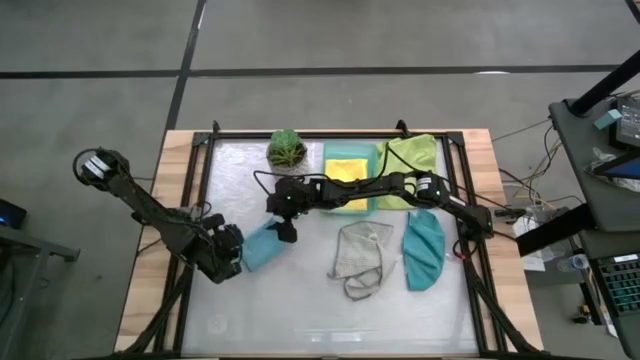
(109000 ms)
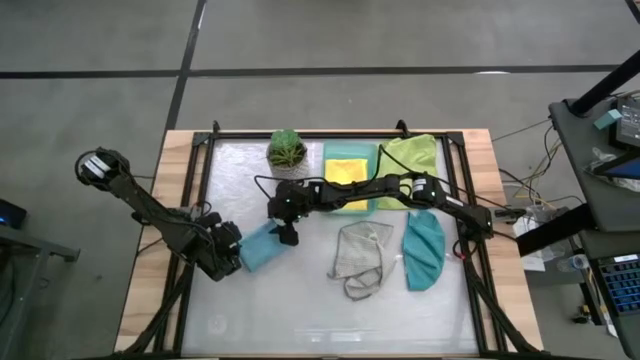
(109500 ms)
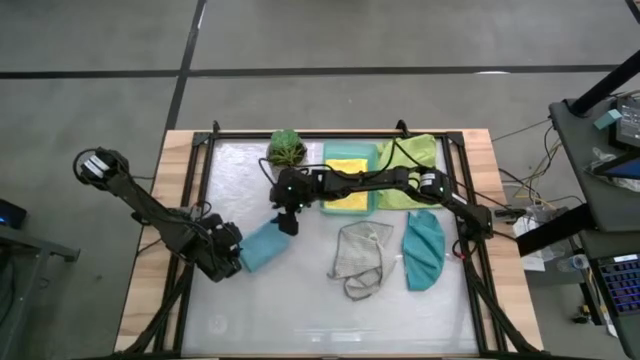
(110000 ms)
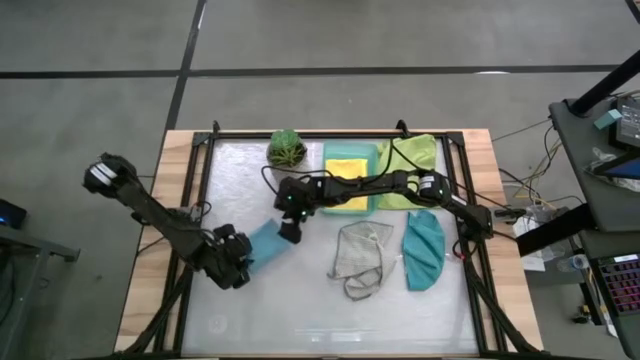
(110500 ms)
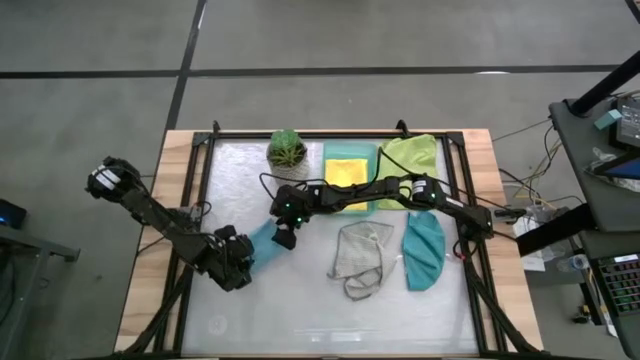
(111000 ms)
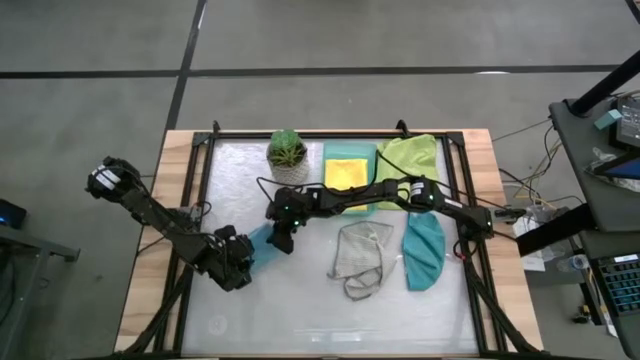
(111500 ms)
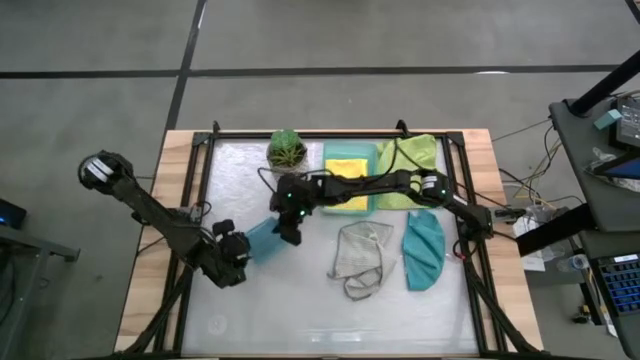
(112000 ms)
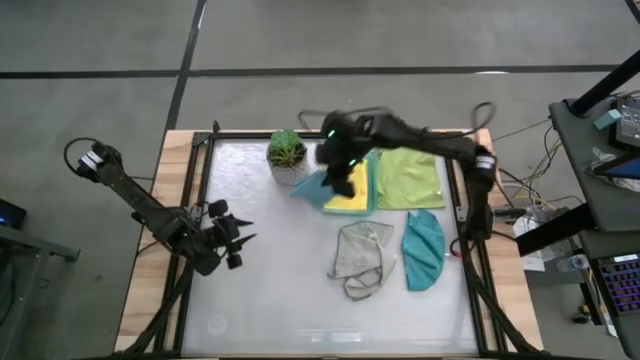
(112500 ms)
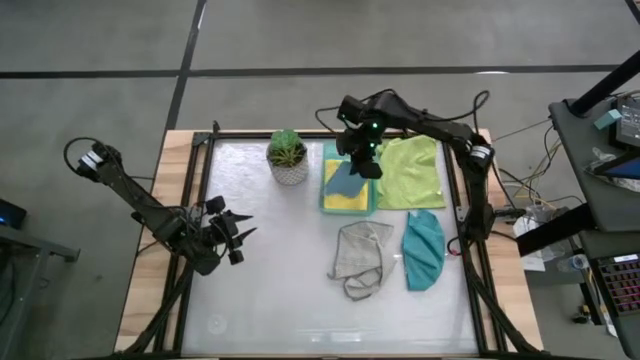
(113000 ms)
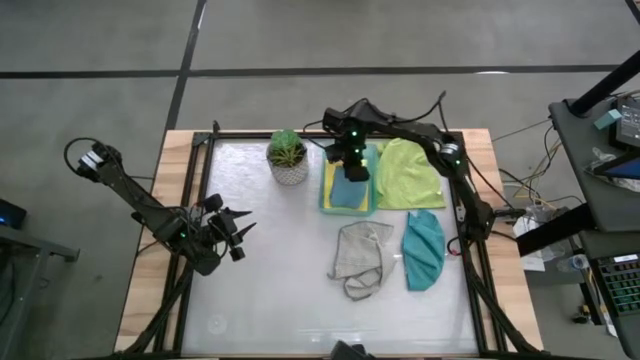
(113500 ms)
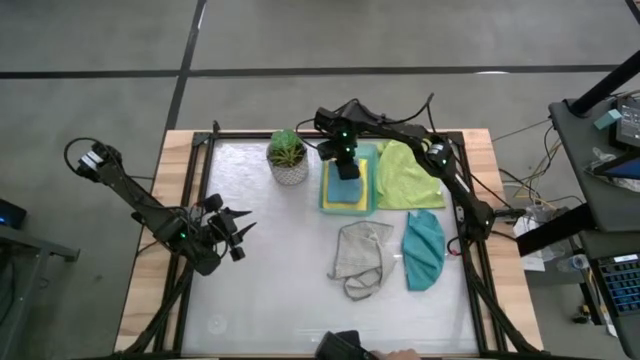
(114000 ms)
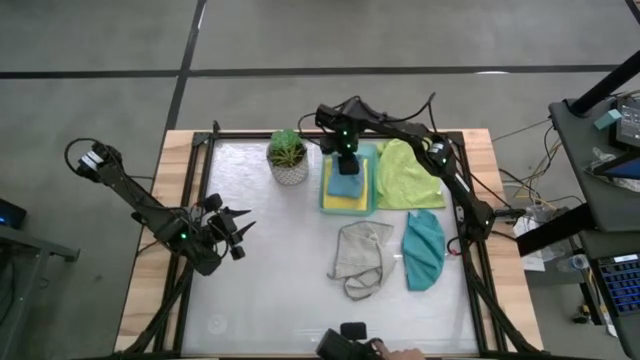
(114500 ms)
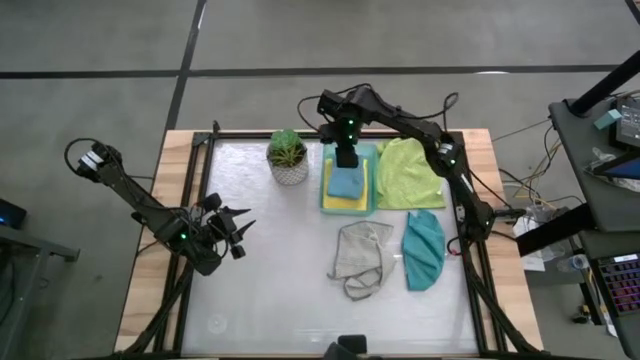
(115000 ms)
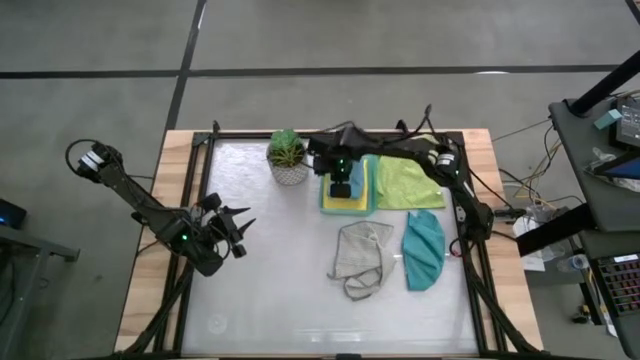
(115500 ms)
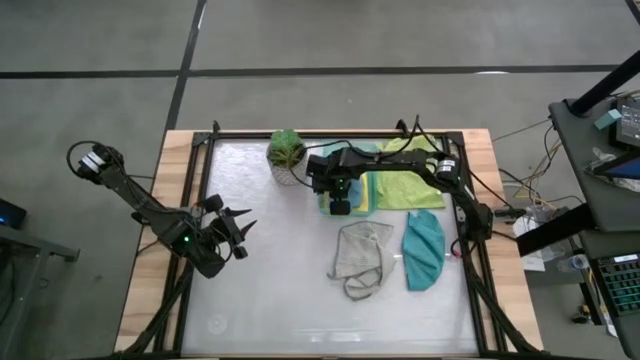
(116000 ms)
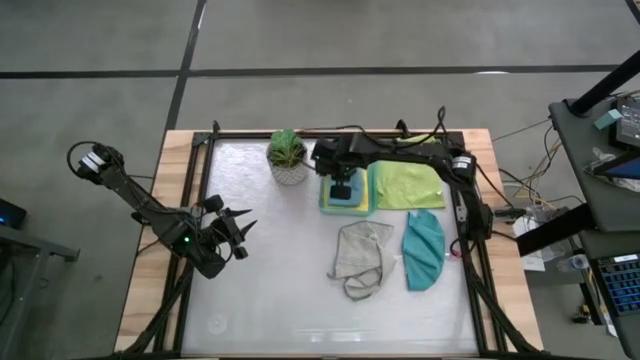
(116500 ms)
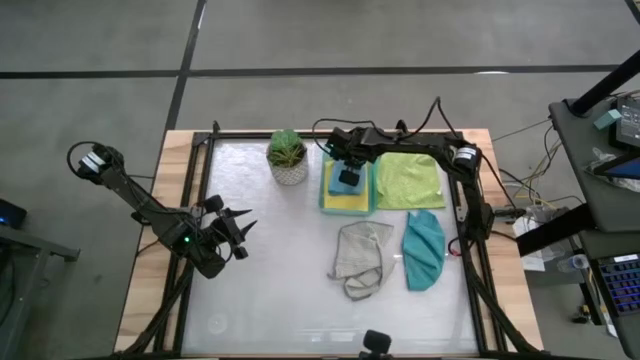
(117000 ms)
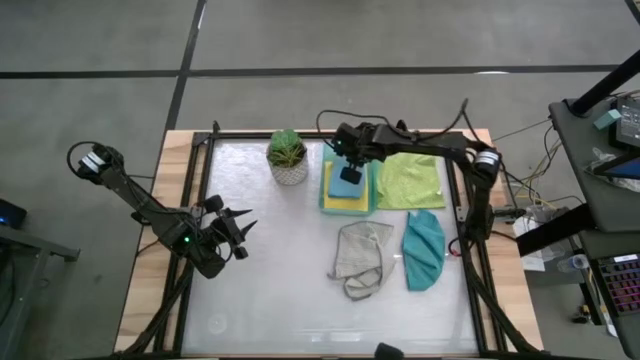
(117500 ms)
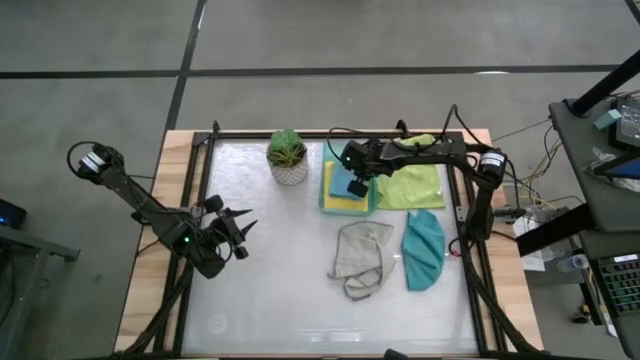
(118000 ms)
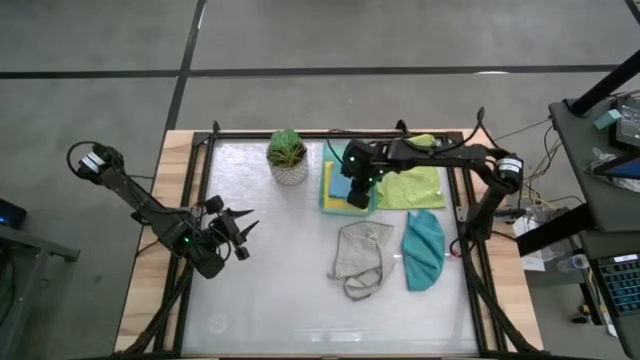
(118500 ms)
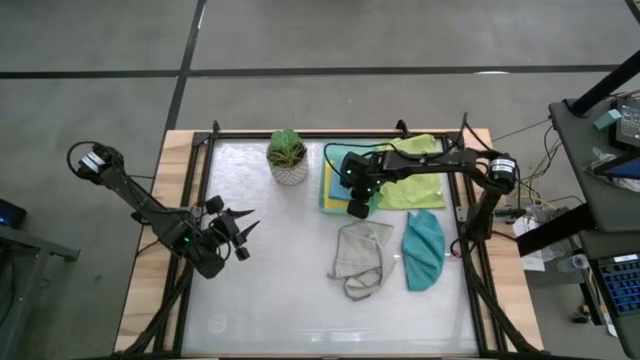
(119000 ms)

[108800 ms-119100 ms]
Task: Fold microfiber towels
Put the folded blue microfiber cloth into the blue bin

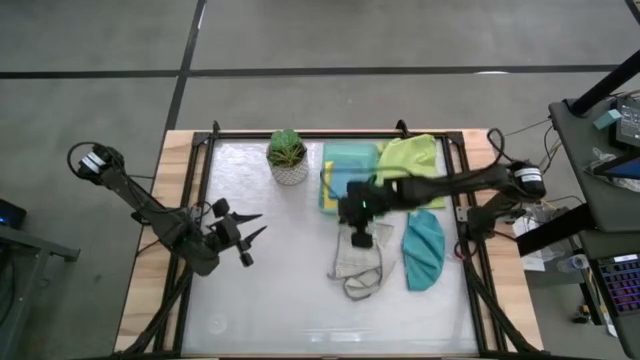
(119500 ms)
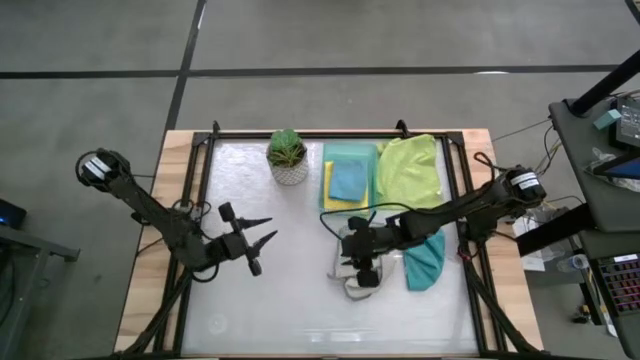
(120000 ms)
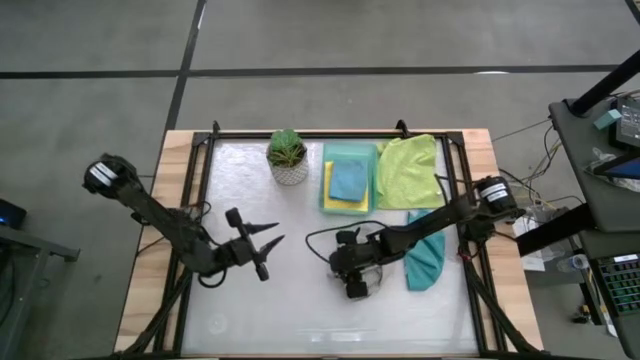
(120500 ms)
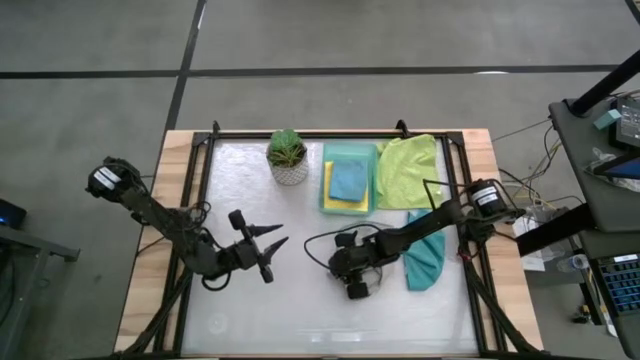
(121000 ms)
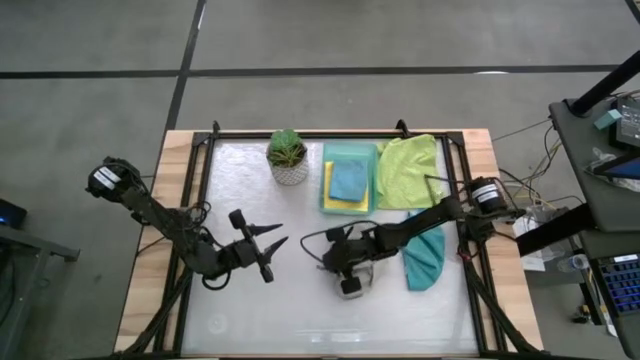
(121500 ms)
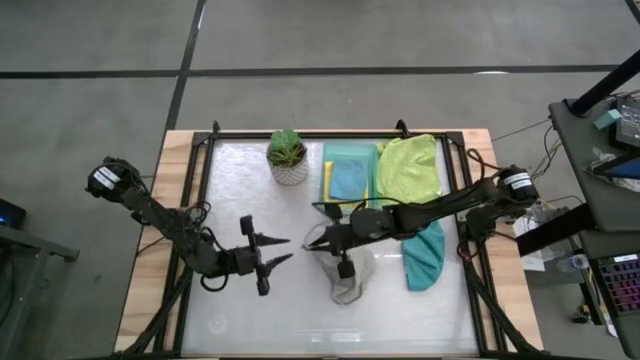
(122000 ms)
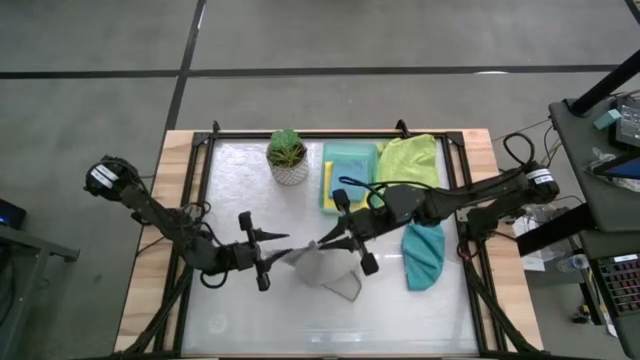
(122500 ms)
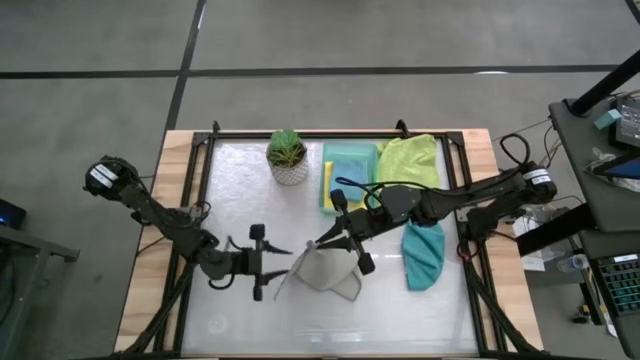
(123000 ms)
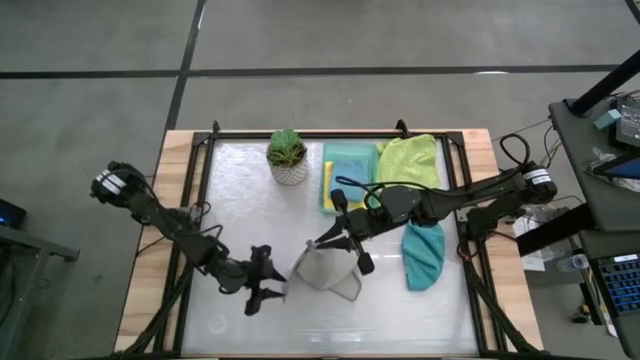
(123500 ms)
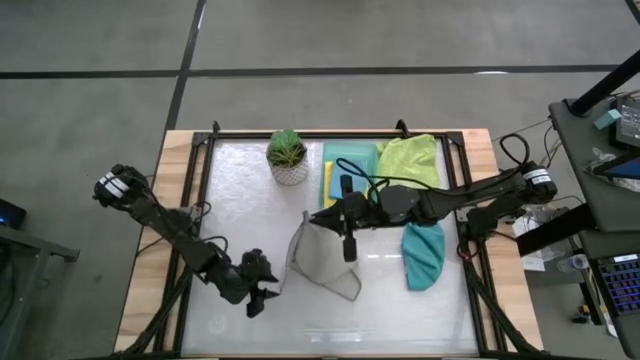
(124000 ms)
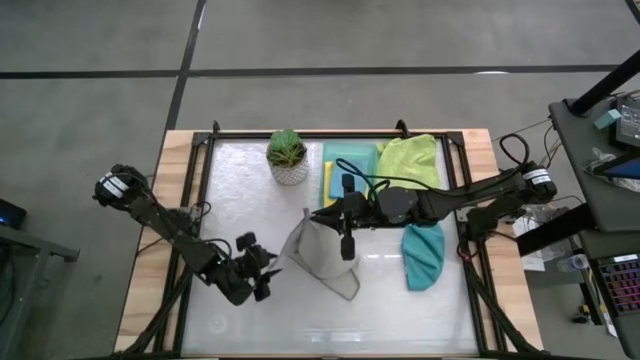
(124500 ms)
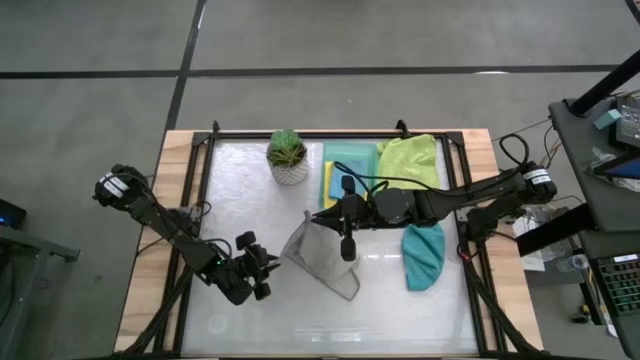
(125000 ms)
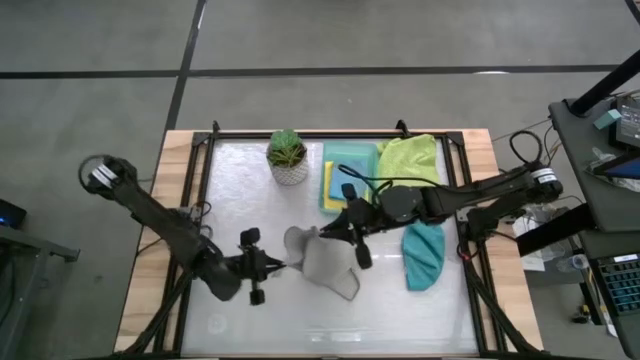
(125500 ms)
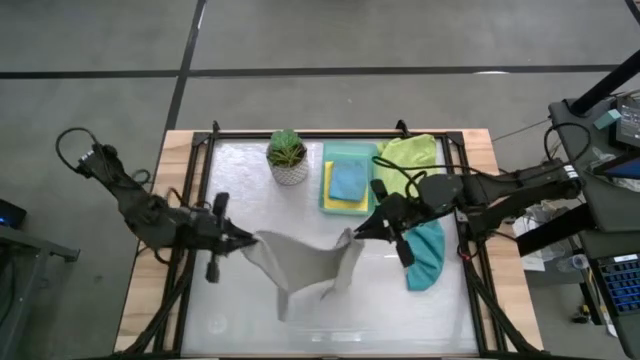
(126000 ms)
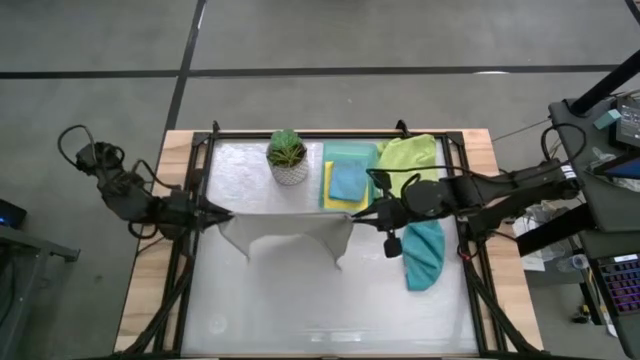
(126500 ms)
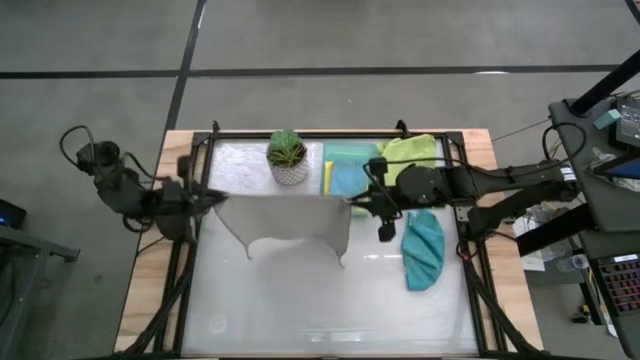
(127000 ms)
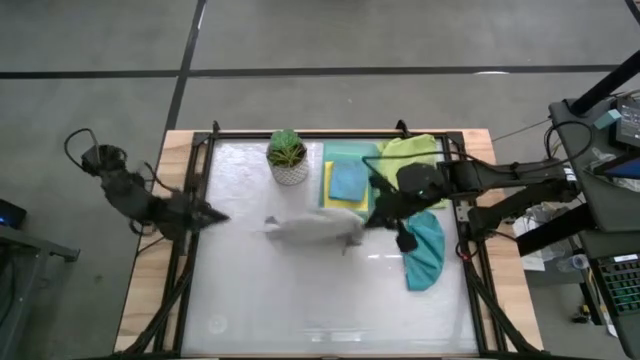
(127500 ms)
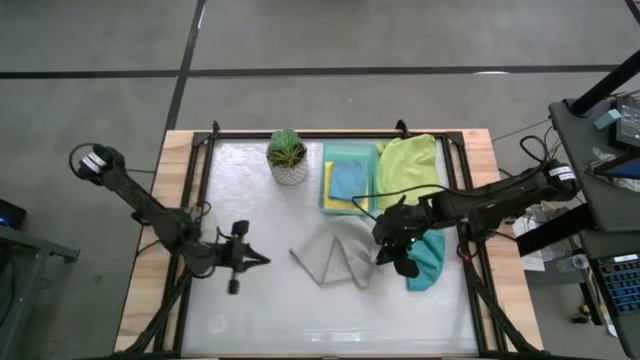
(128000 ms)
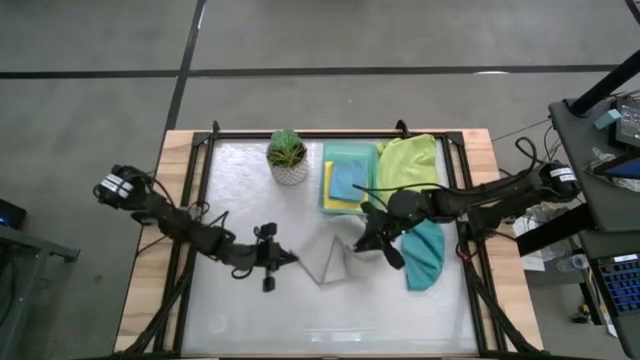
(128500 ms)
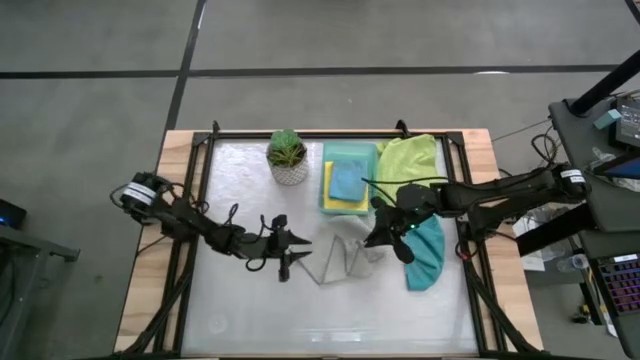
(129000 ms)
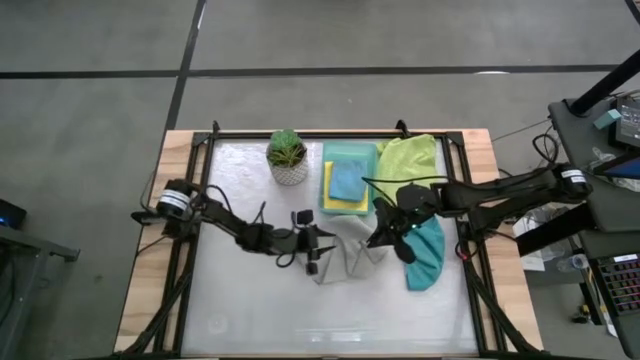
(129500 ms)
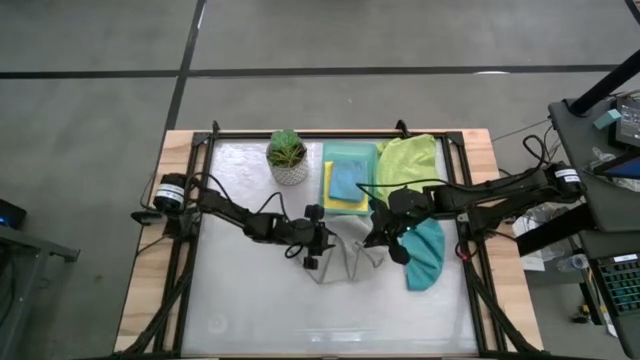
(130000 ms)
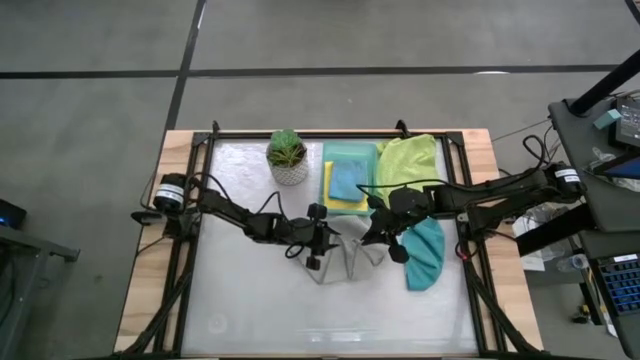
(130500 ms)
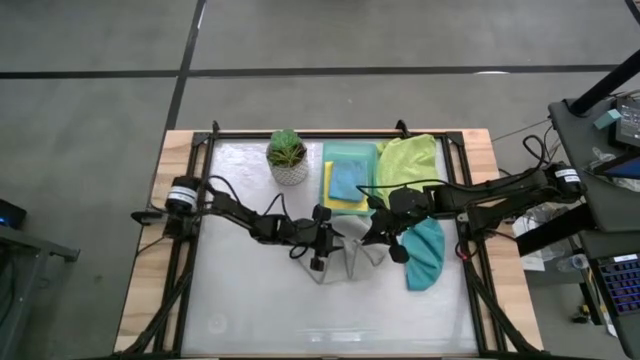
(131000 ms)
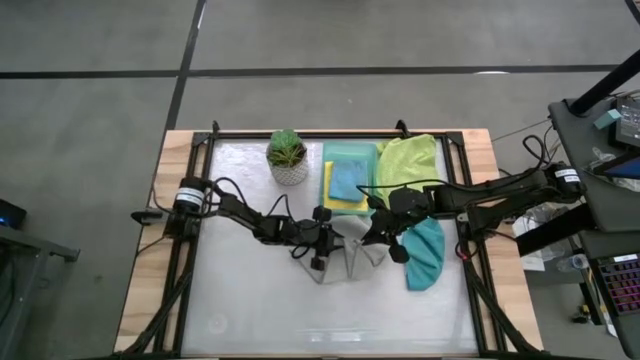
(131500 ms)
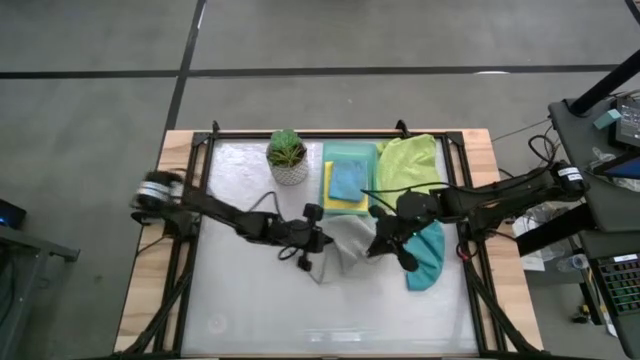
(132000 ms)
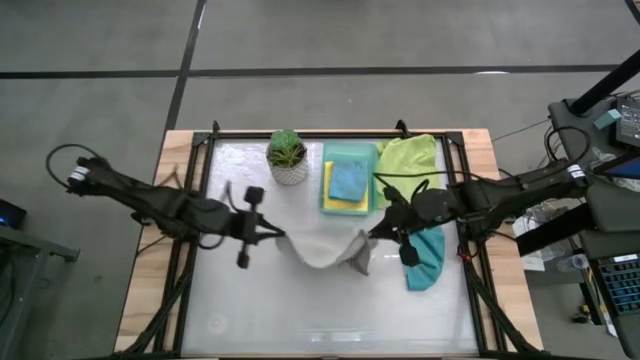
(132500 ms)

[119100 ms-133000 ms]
Fold the gray microfiber cloth
